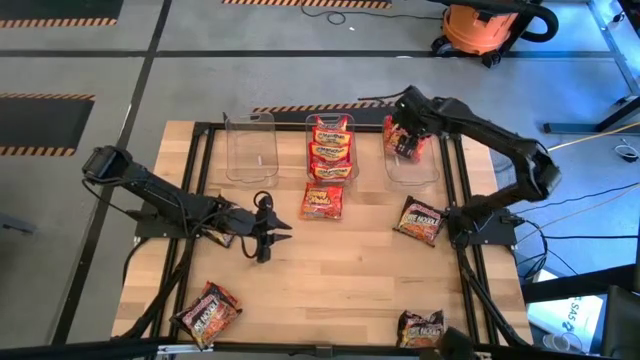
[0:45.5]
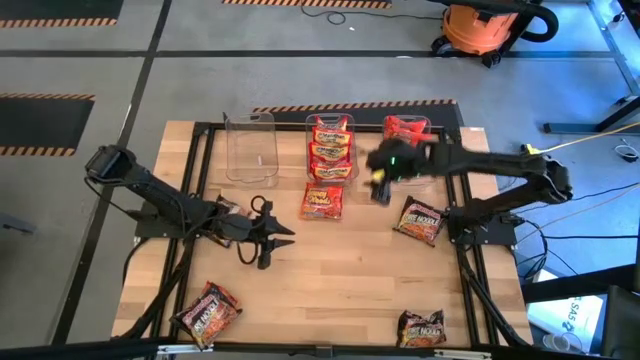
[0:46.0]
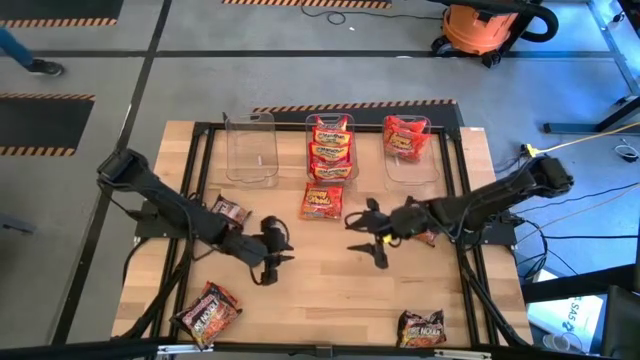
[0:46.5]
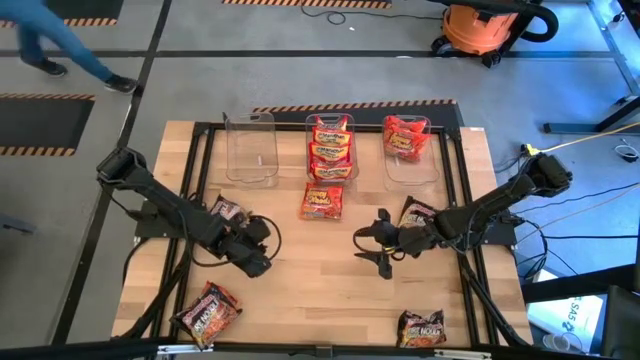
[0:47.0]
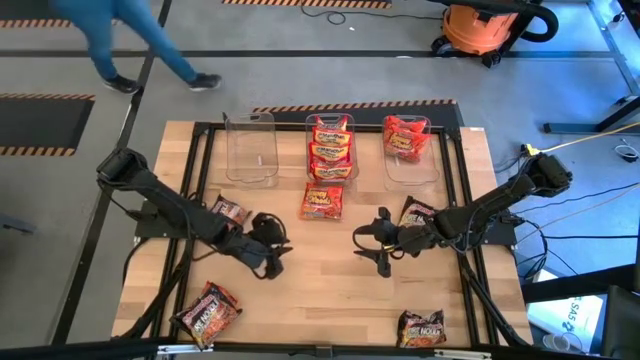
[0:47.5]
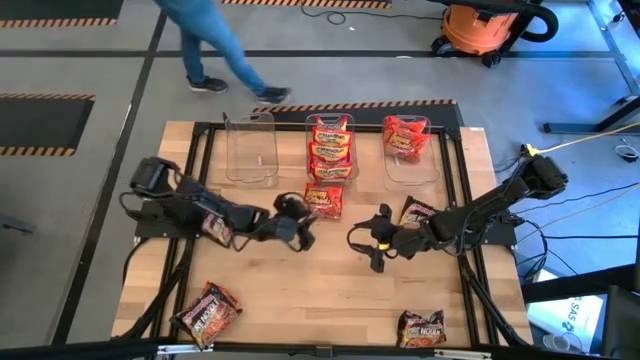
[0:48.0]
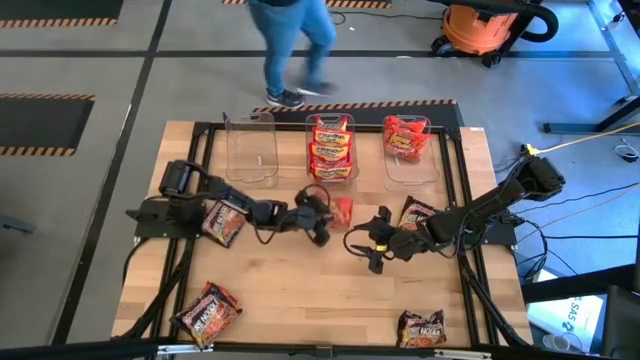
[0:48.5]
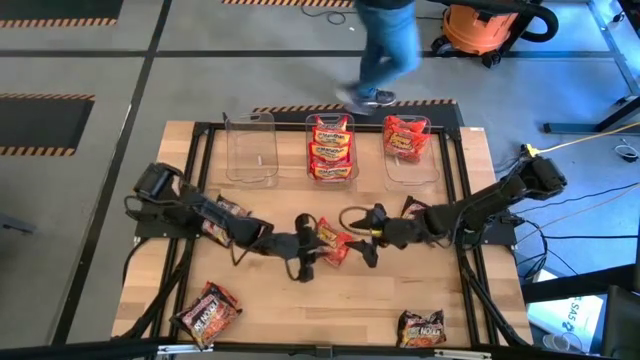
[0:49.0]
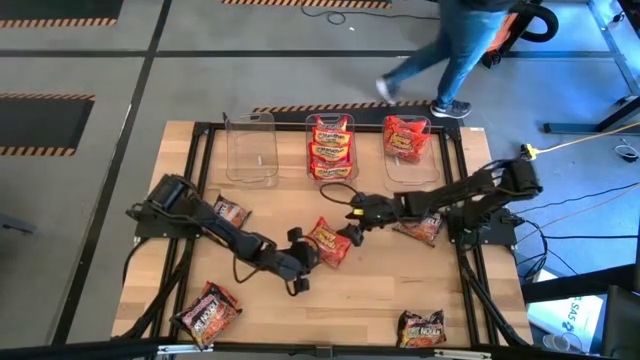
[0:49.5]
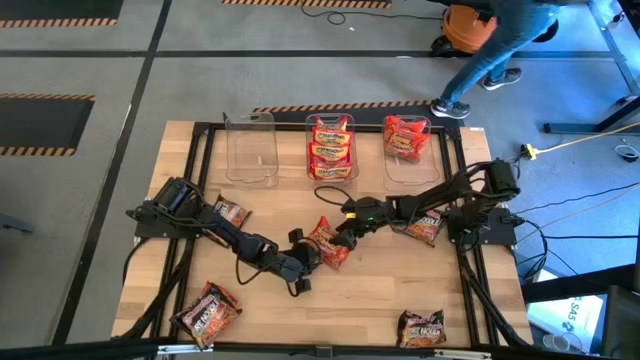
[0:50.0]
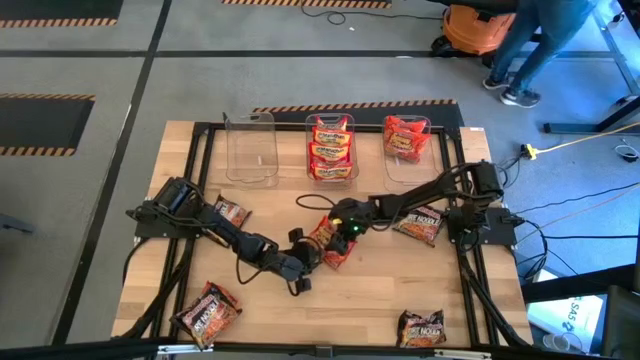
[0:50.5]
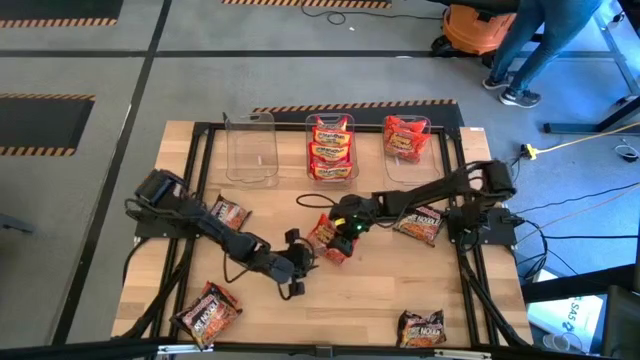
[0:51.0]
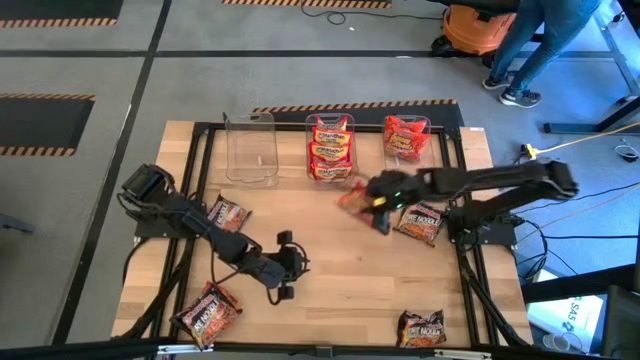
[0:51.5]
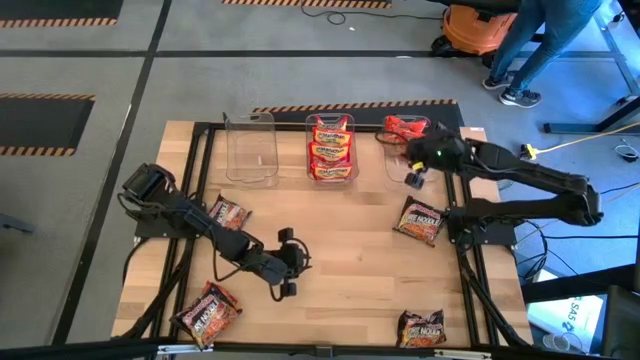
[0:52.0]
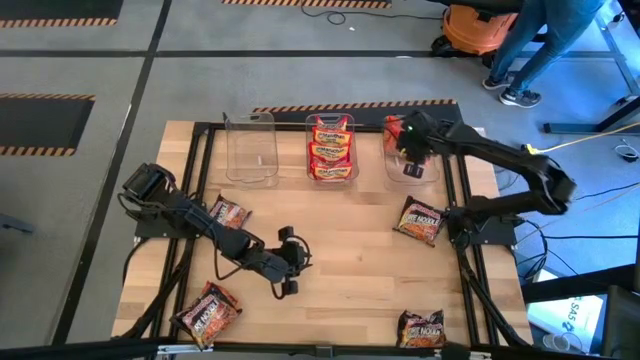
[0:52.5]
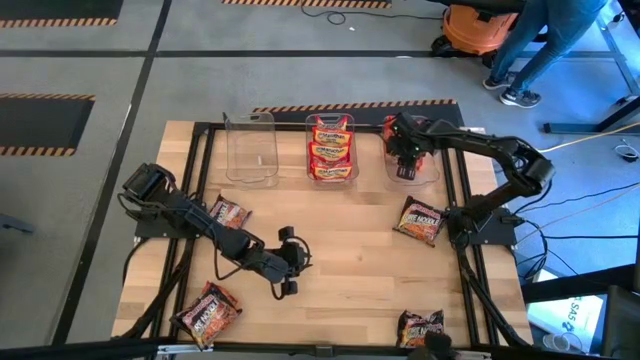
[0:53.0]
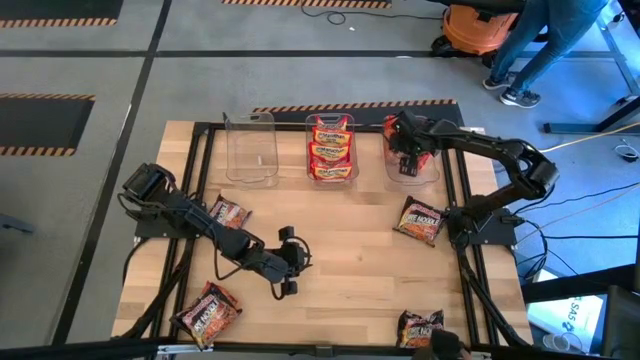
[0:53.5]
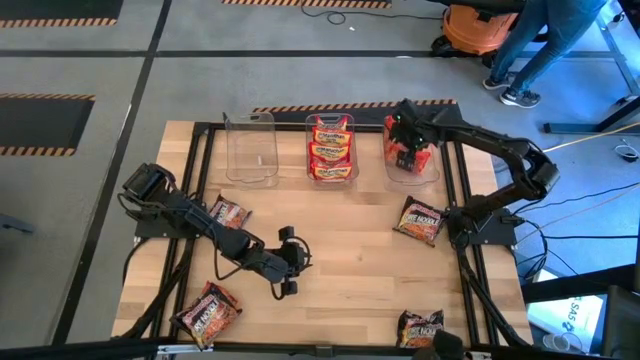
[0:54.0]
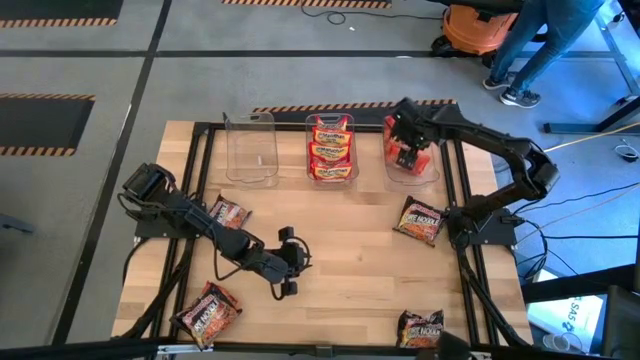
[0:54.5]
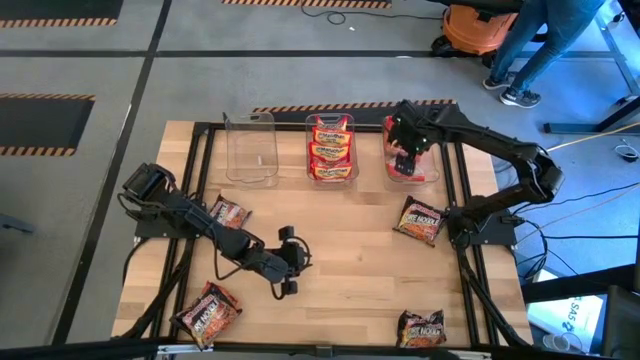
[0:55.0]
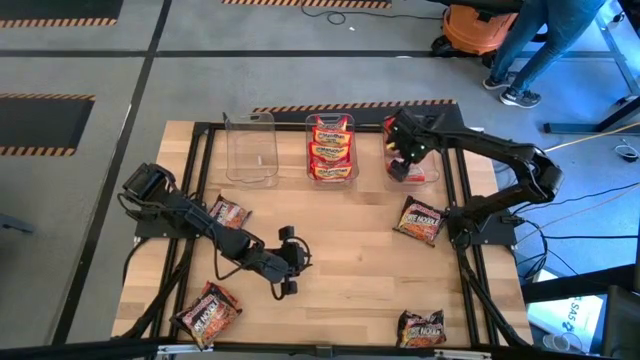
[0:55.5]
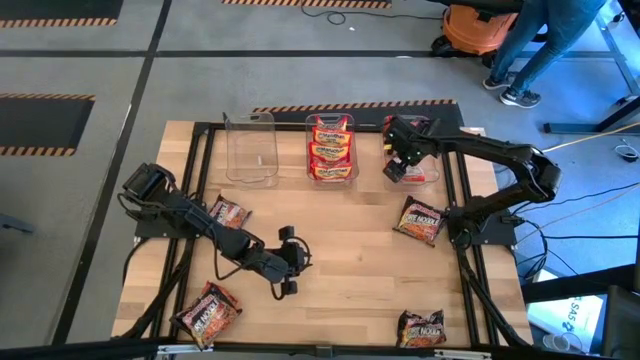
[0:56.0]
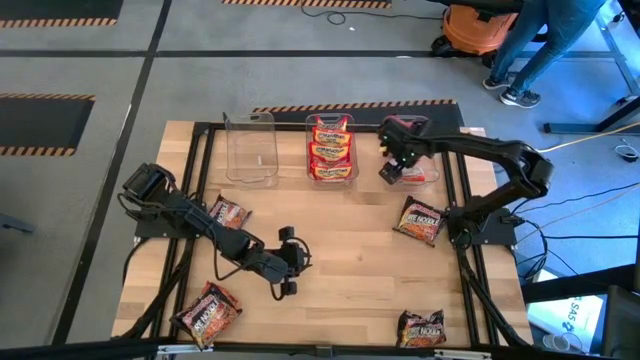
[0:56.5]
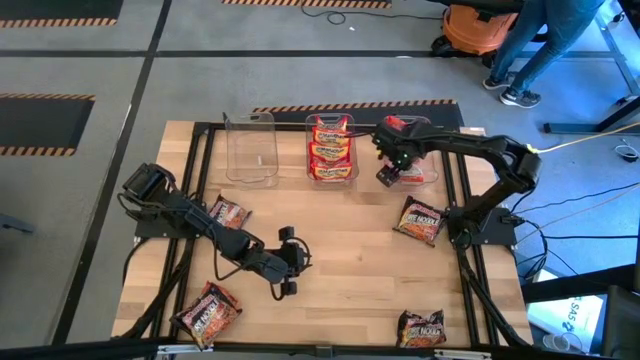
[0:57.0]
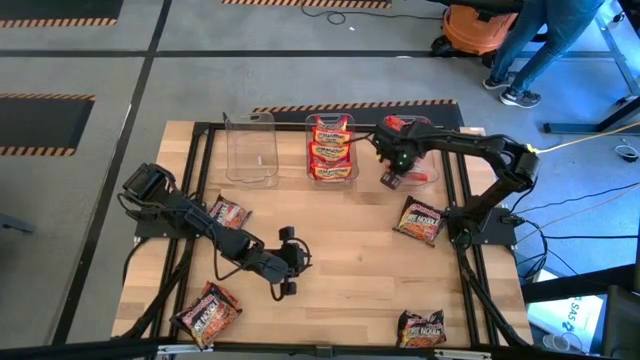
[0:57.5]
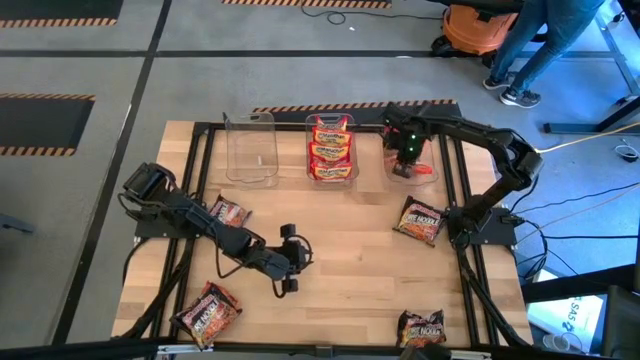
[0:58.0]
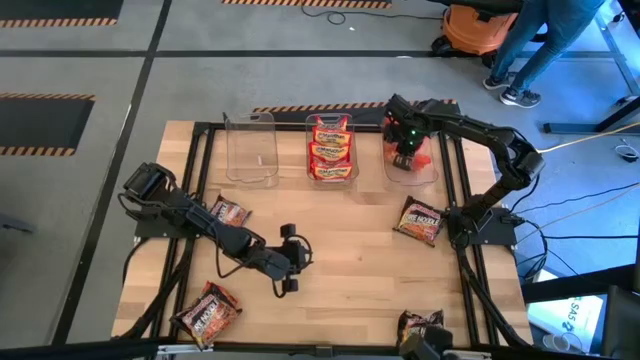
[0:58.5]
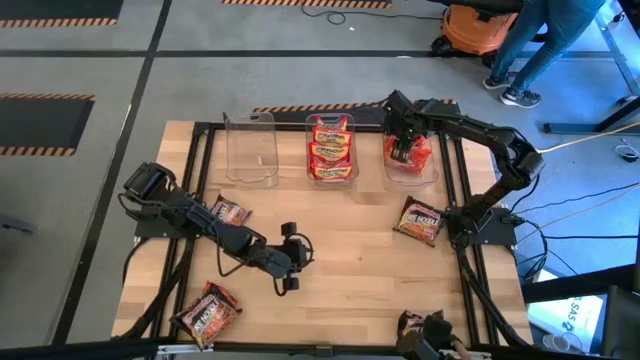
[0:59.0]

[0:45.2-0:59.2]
Task: Sort Maruchan noodles
Put the orange noodle pack into the right transparent bin

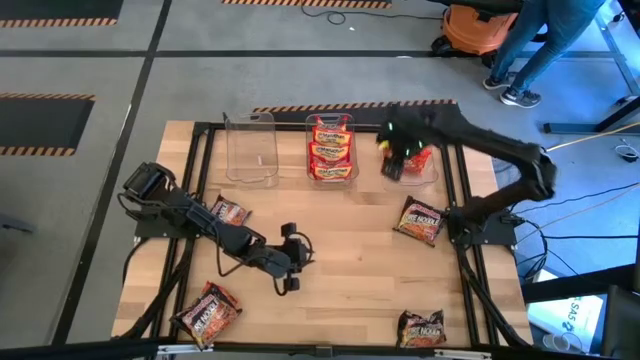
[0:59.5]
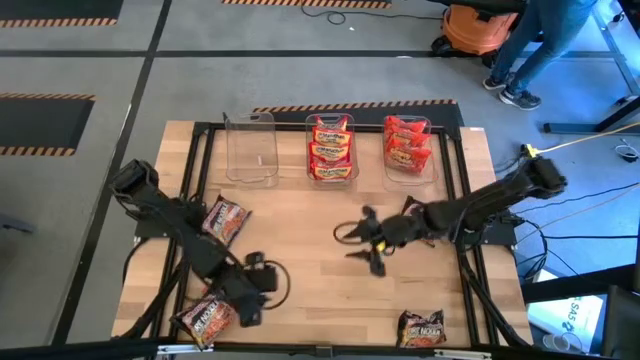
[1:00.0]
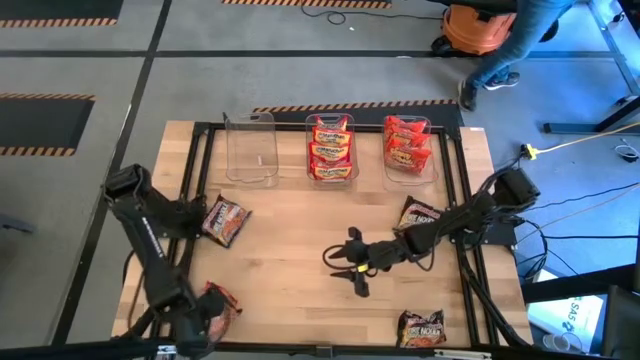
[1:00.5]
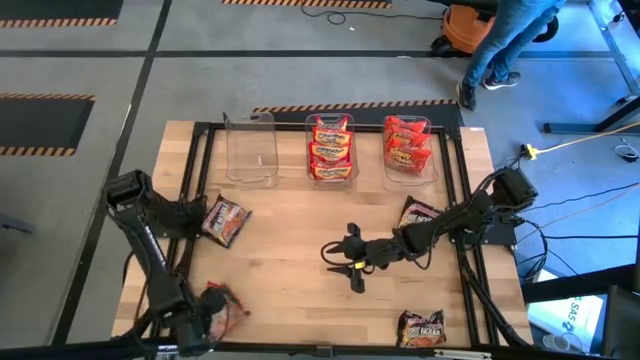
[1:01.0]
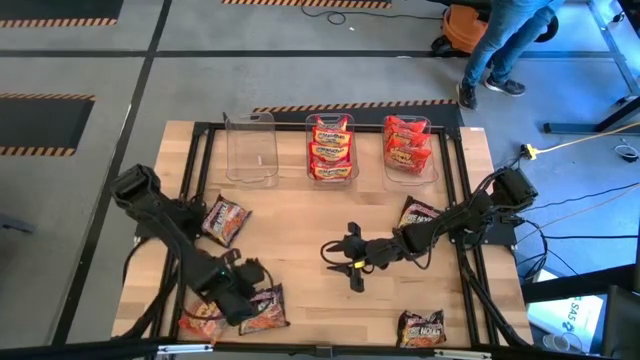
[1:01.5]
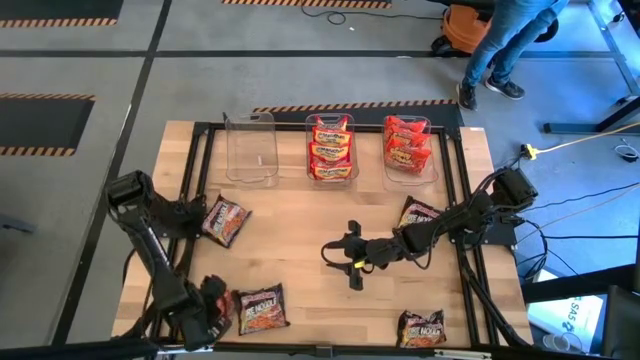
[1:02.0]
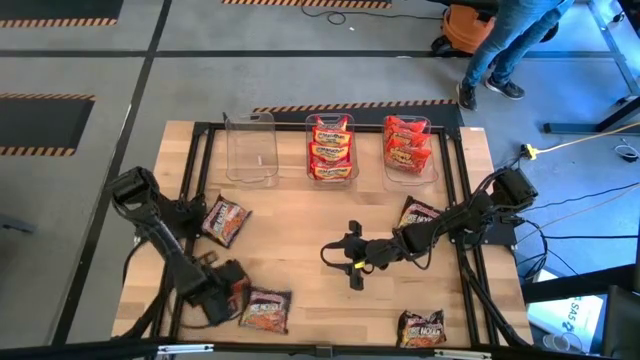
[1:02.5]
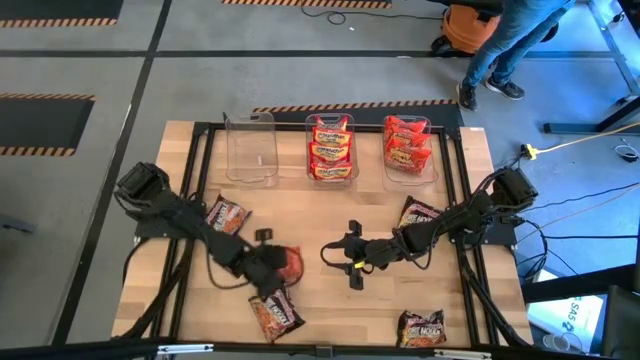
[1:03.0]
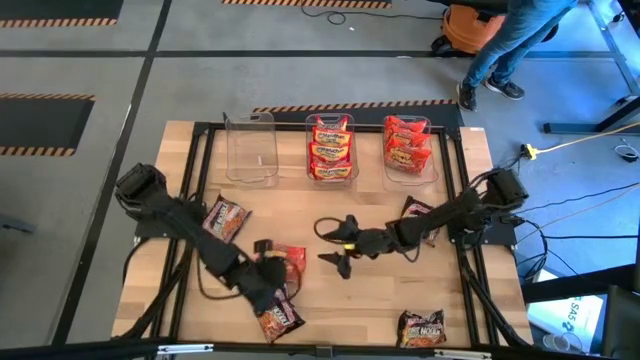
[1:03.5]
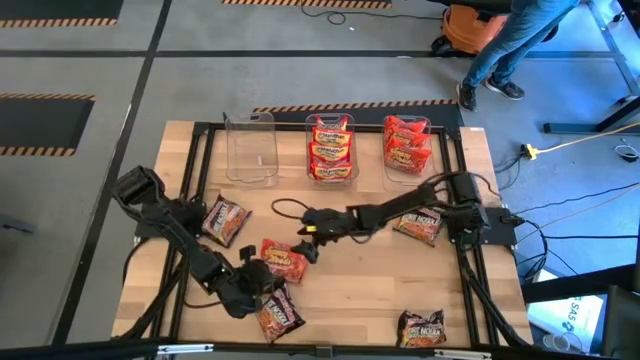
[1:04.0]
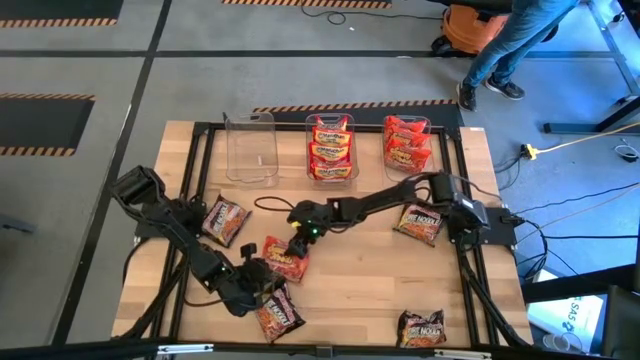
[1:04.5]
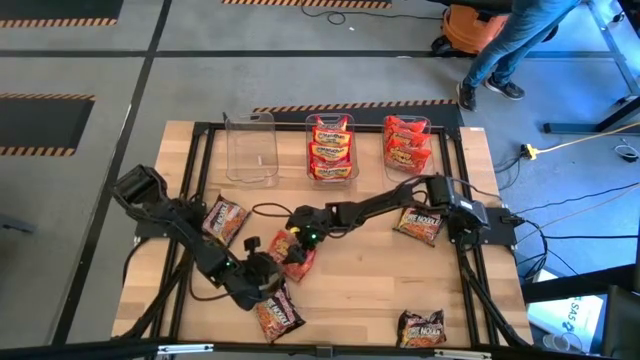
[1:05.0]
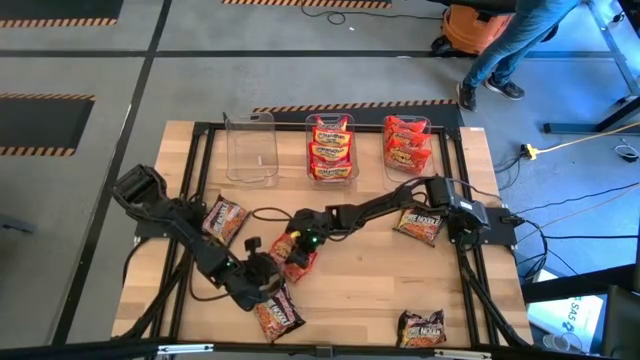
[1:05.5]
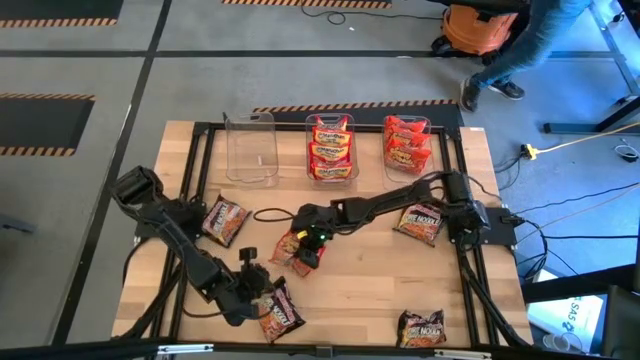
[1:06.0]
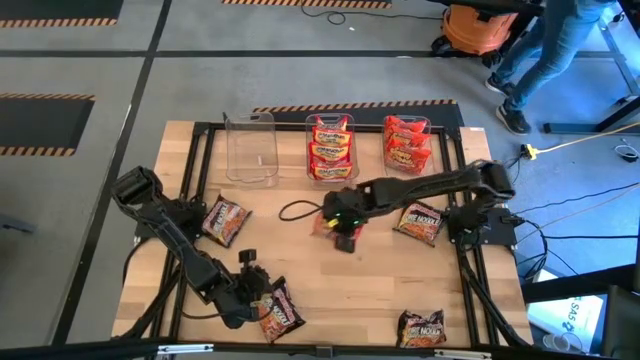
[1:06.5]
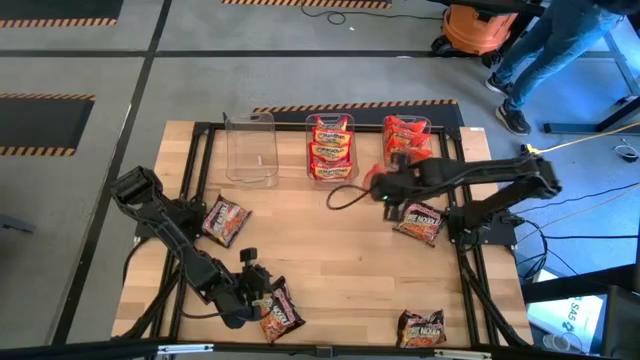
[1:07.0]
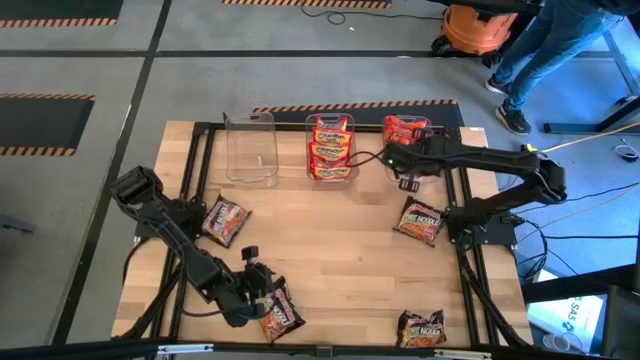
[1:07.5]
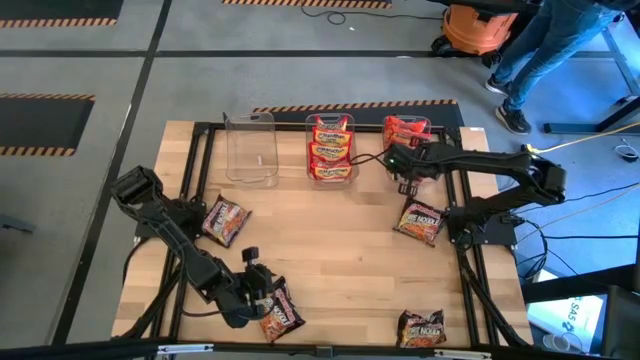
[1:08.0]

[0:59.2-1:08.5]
Put the orange noodle pack into the right transparent bin
